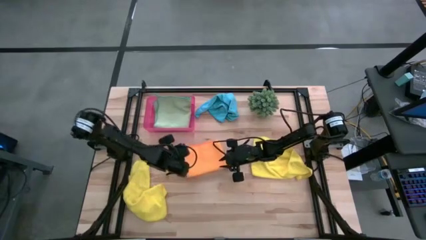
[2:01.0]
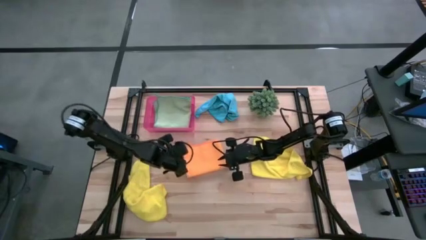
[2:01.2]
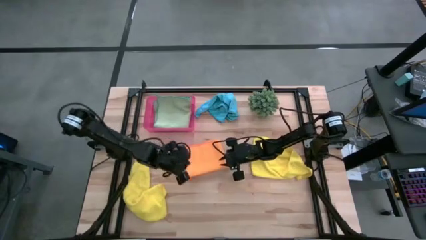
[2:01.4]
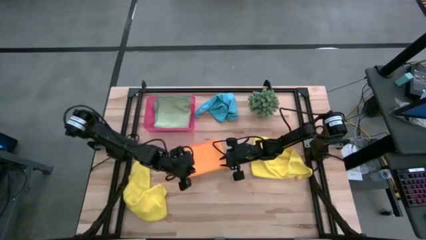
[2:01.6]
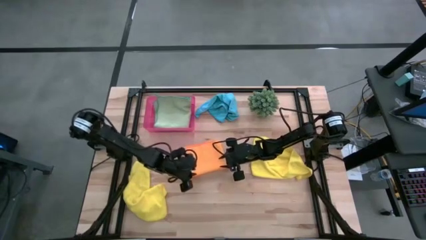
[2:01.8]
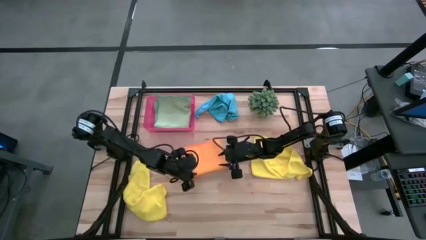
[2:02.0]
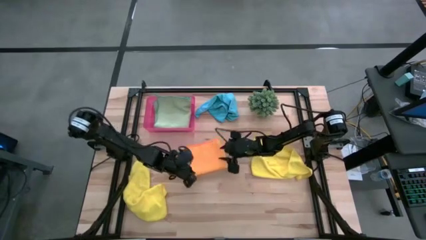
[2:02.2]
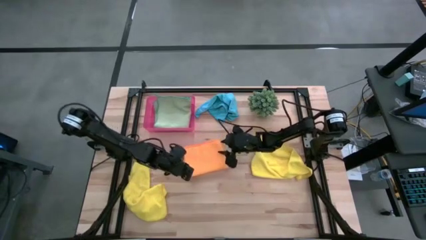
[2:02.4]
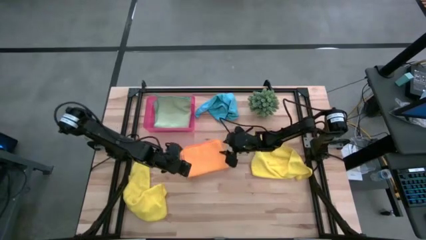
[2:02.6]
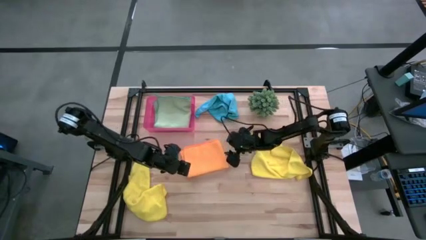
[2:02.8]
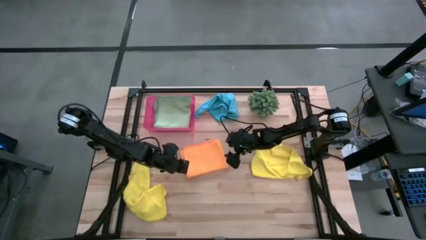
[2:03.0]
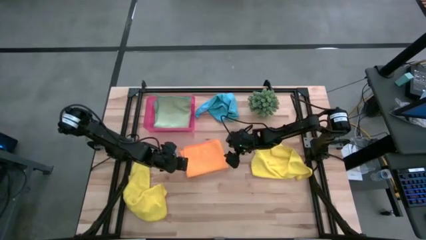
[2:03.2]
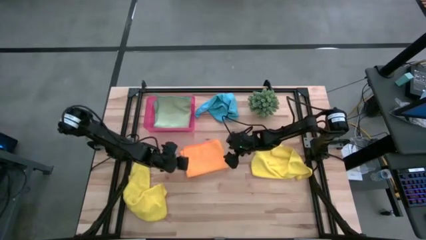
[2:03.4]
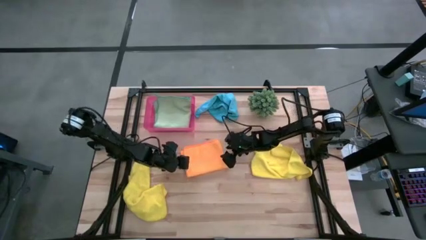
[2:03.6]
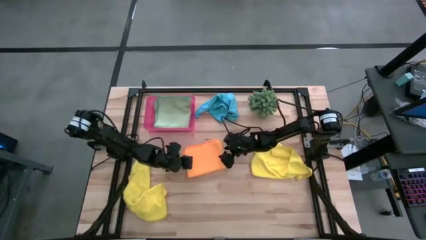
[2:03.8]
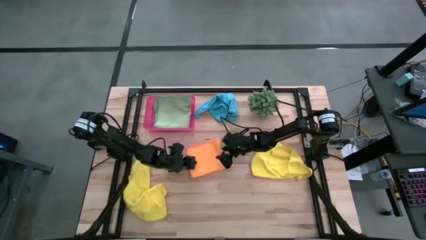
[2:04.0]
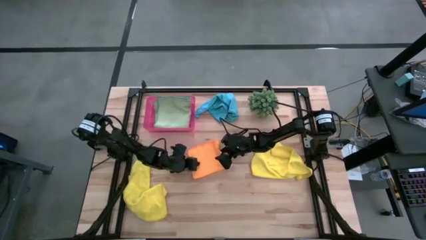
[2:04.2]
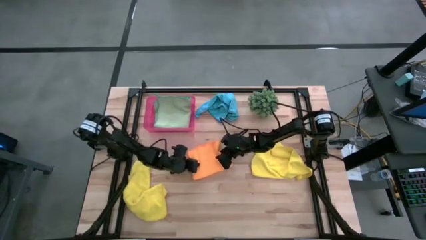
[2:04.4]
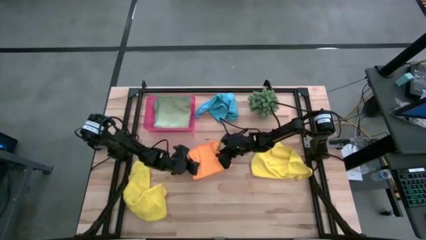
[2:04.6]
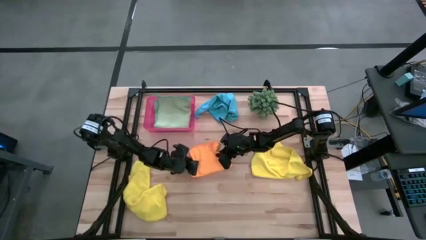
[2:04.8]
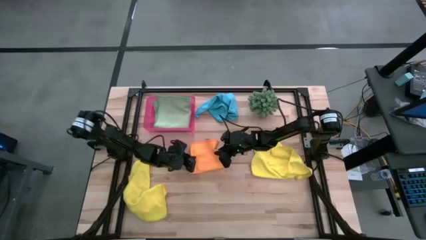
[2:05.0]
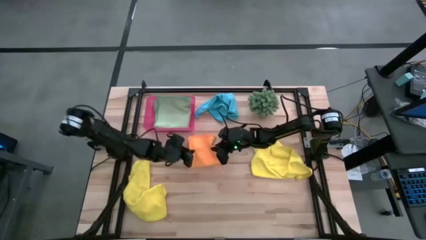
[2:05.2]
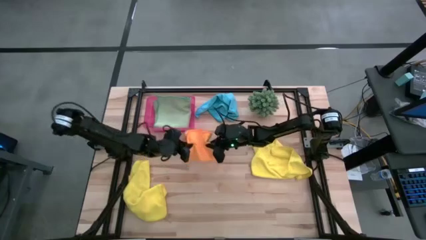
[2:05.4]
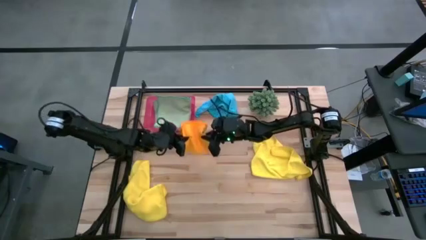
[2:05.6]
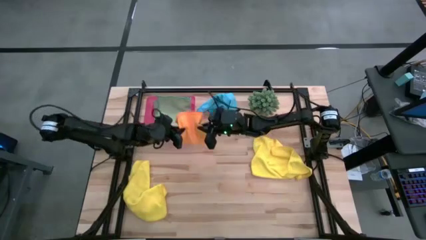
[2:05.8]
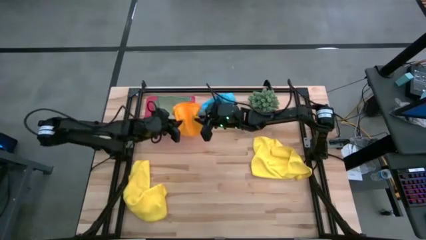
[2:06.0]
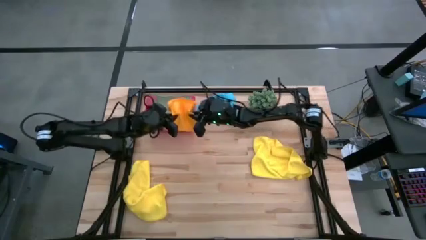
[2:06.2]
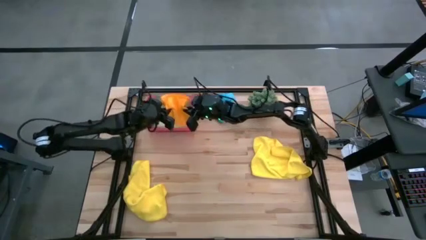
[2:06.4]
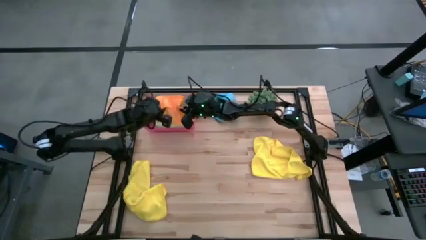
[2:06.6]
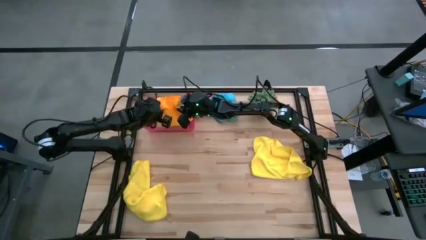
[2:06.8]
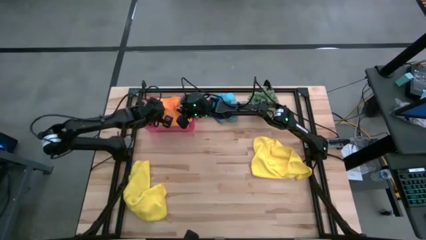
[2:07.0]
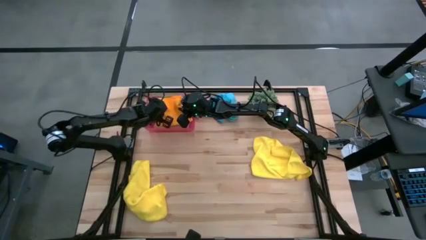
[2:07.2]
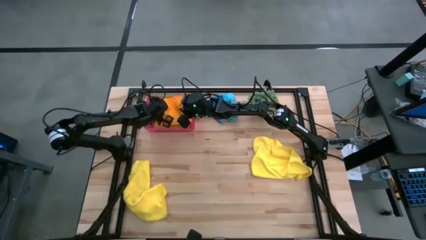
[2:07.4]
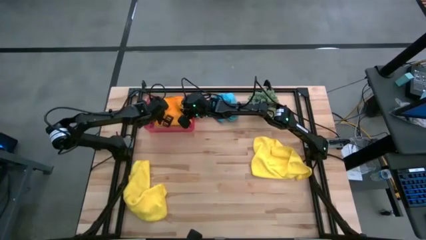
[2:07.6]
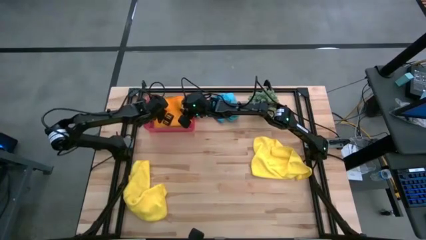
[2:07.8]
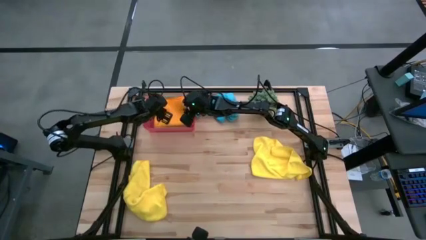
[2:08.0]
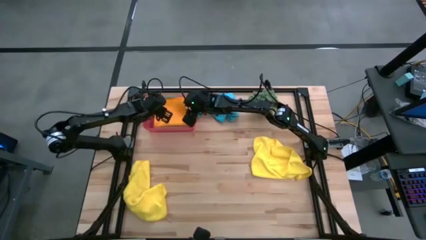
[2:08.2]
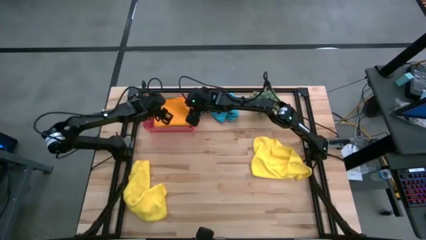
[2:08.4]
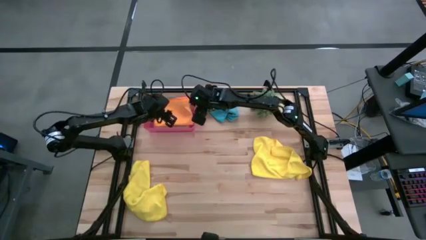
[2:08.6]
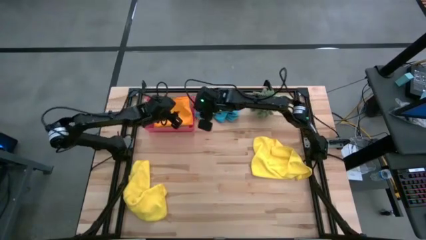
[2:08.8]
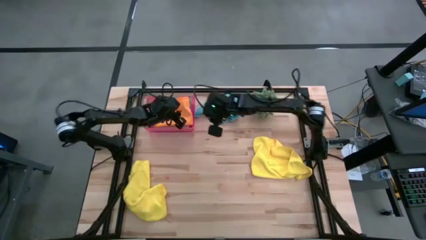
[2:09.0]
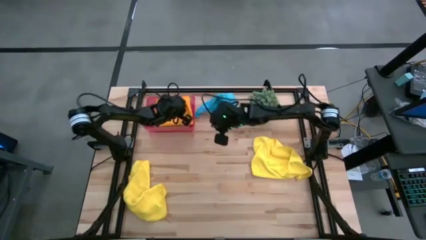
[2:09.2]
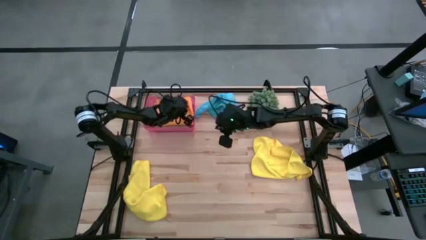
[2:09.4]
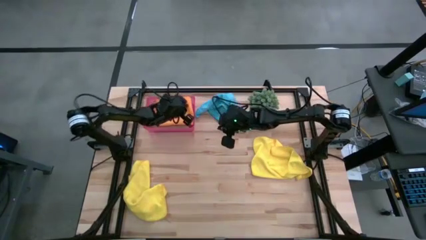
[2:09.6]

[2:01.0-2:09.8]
Task: Fold microfiber towels
Put the orange towel into the bin
